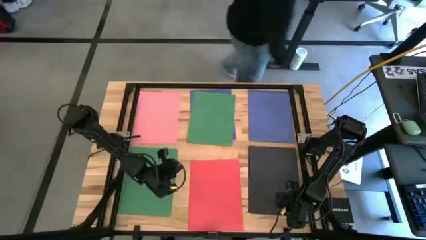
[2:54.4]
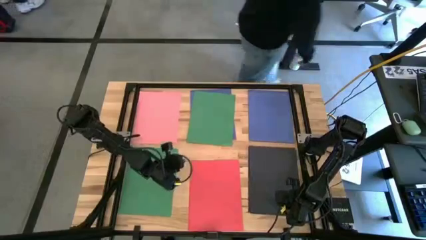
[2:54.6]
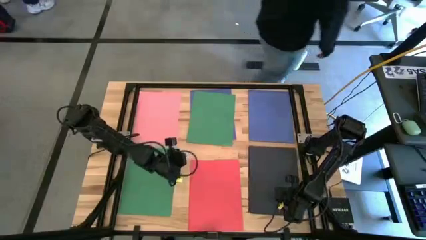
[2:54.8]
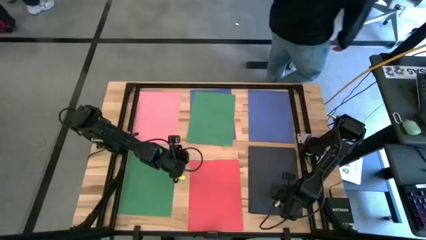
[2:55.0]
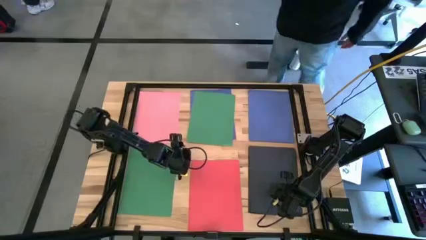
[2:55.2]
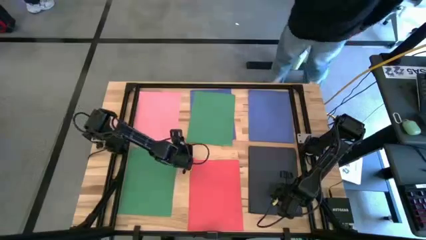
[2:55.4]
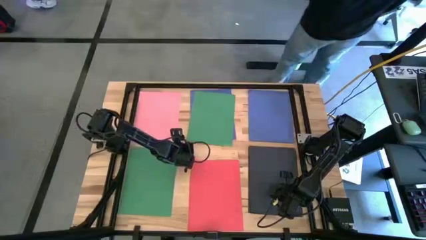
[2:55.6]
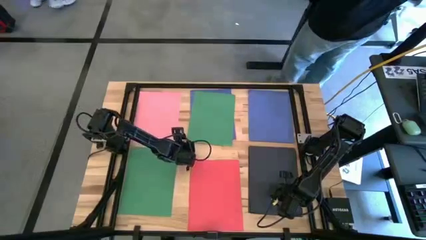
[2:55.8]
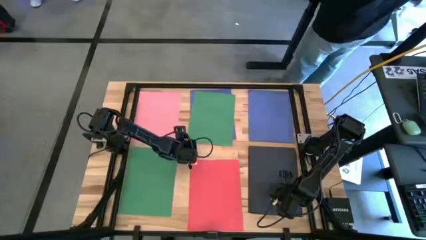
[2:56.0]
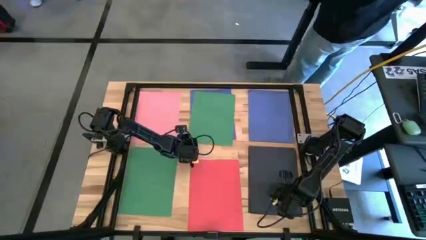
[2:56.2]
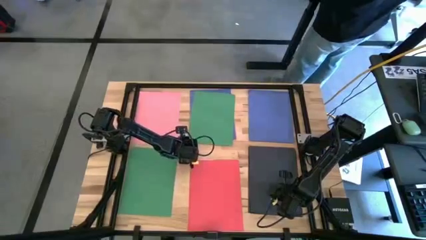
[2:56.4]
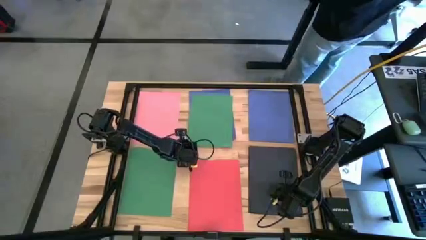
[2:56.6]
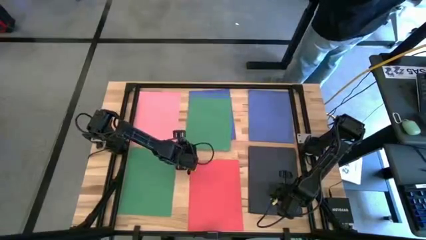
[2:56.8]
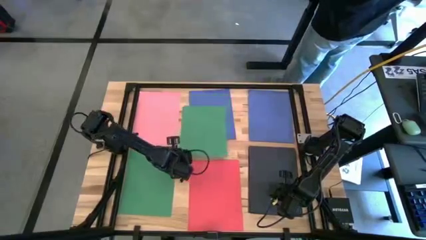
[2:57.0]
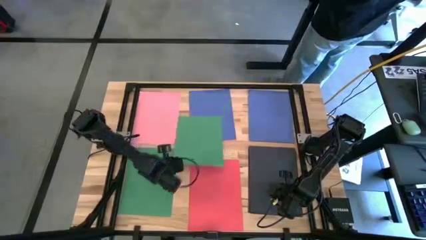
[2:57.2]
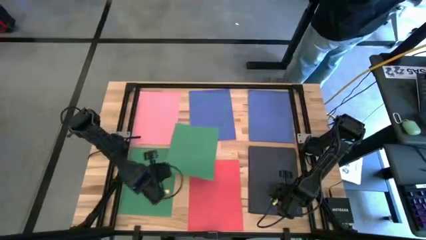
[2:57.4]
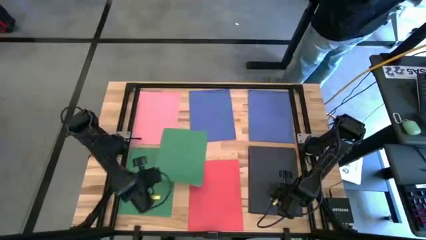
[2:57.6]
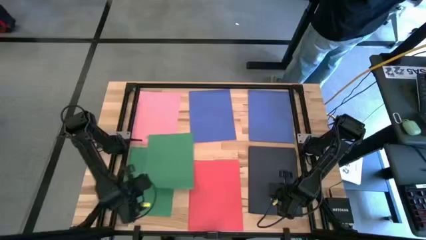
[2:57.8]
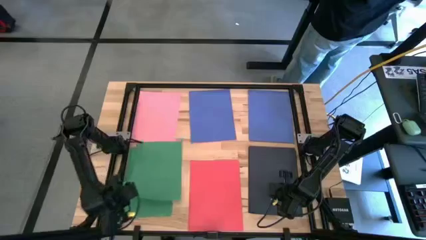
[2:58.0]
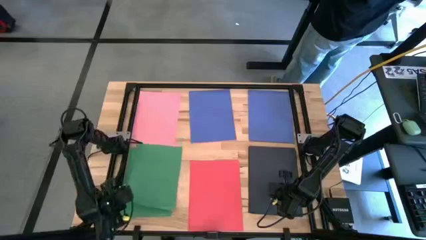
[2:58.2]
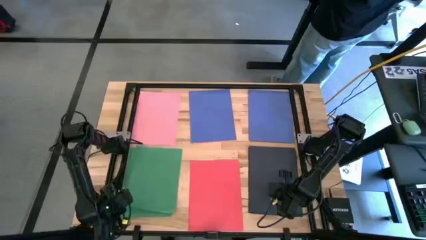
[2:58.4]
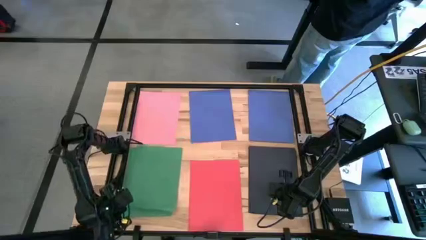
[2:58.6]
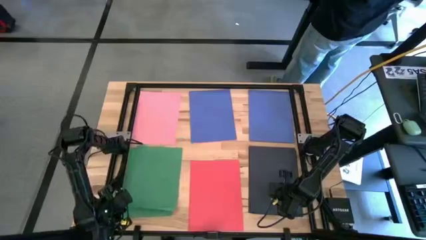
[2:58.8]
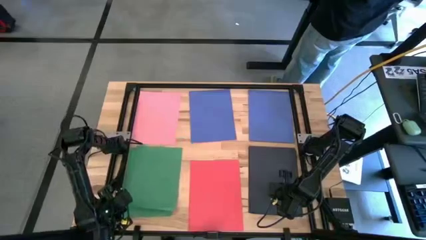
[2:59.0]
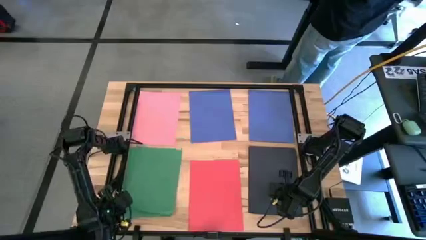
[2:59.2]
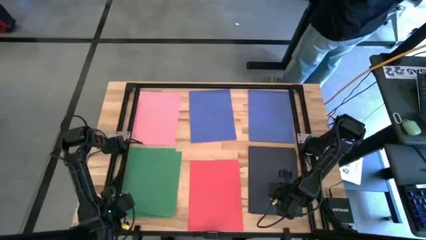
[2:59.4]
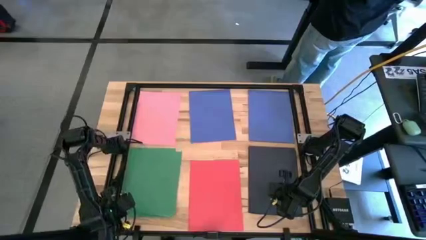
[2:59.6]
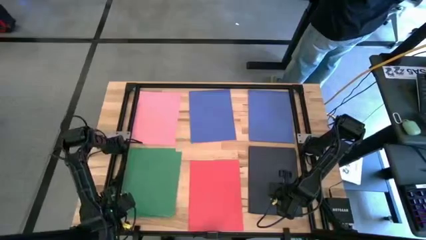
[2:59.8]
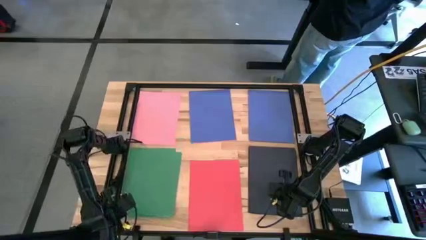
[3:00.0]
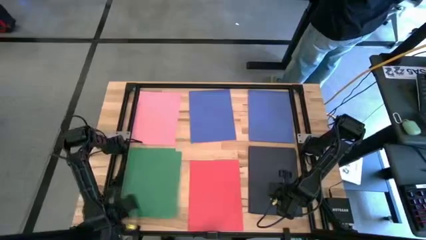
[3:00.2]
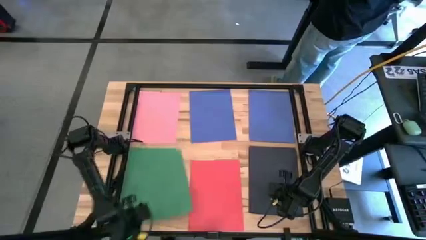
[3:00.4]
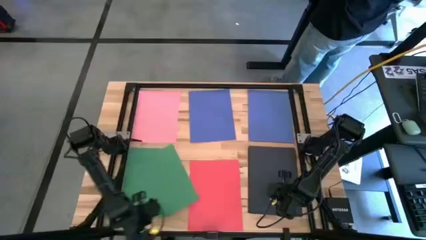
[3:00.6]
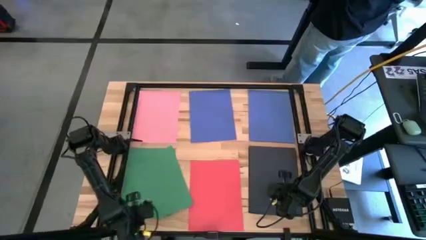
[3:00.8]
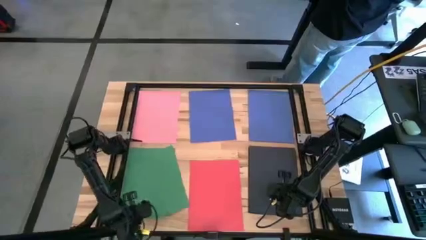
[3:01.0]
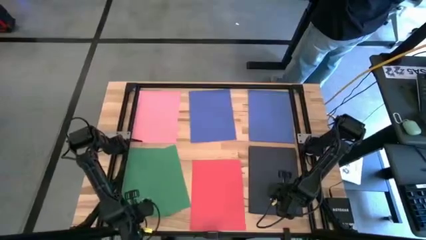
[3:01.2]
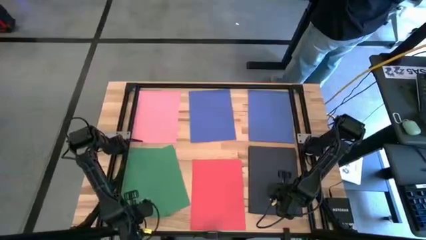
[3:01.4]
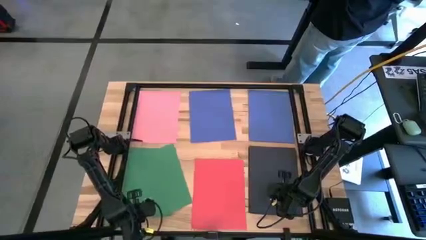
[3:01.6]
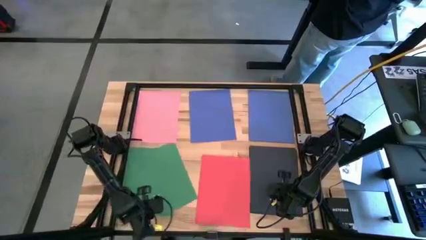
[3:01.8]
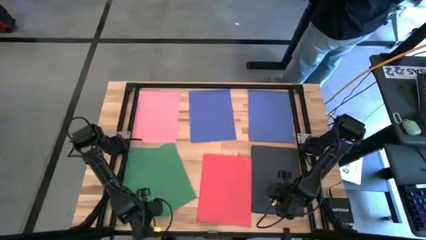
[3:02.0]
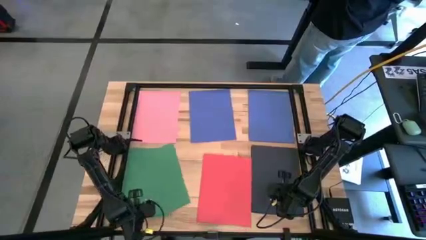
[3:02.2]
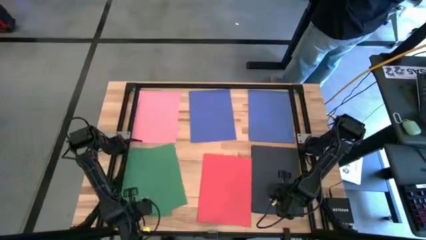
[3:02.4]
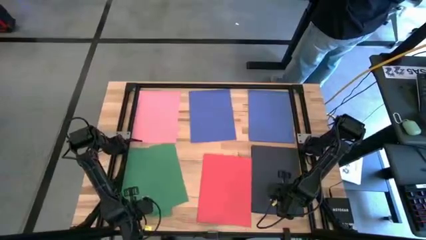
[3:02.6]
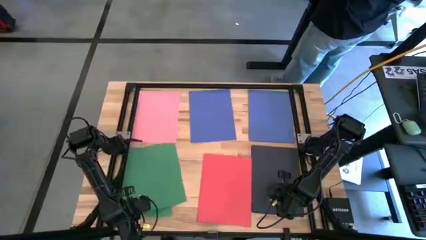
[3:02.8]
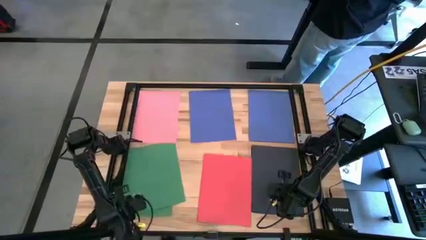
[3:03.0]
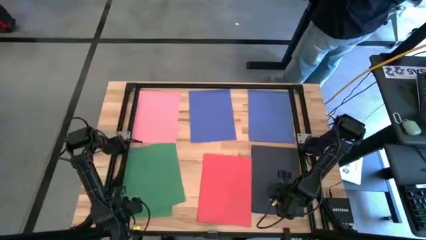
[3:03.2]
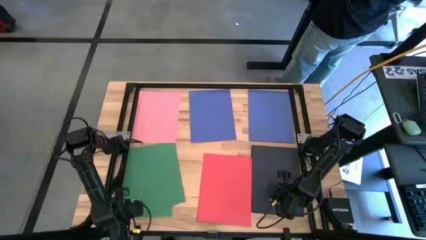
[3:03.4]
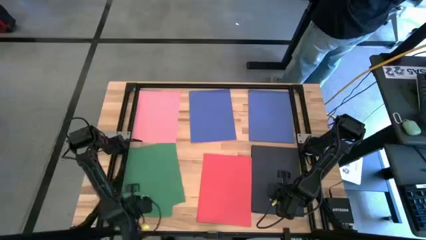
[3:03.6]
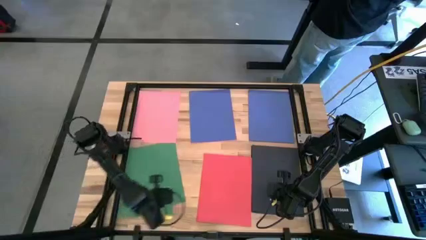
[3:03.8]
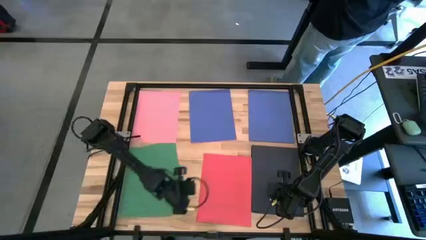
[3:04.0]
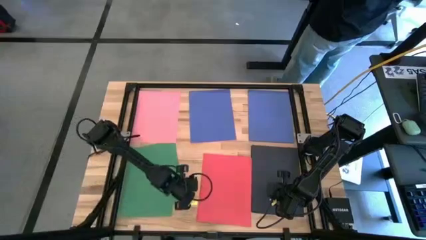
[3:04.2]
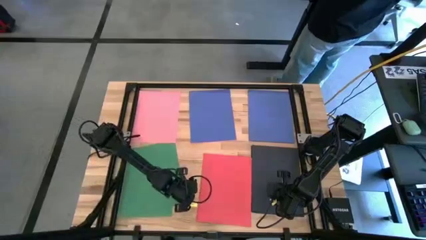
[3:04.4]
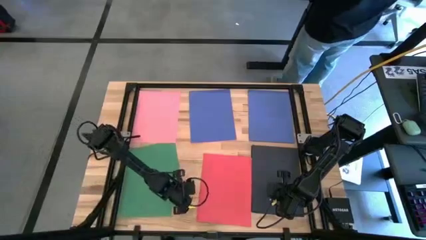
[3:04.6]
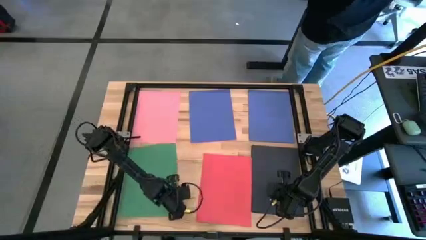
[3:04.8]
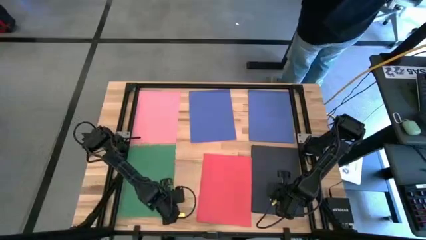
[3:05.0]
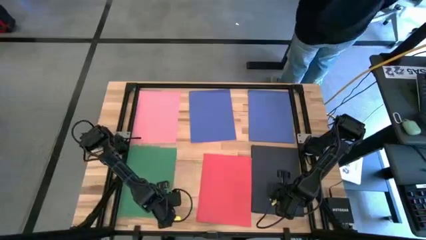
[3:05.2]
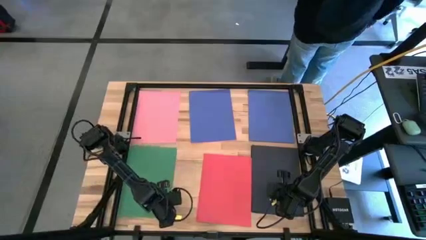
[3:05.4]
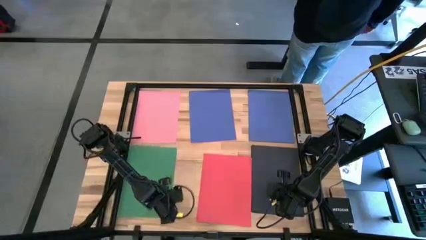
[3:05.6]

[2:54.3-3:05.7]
Task: Organize paper
Stack the green paper on top of the green paper

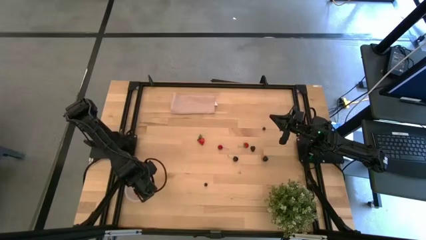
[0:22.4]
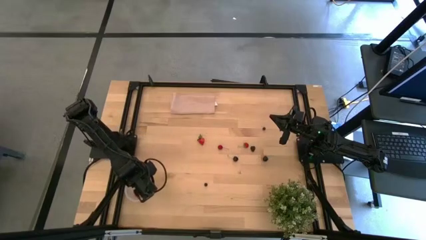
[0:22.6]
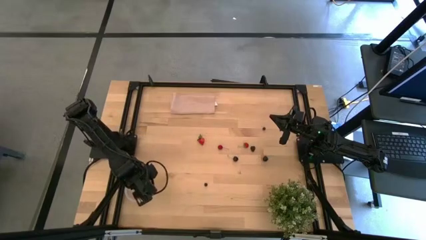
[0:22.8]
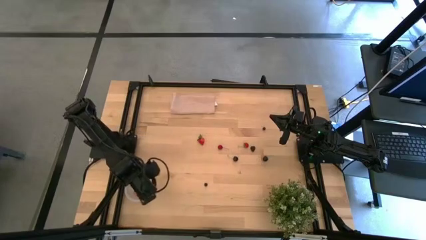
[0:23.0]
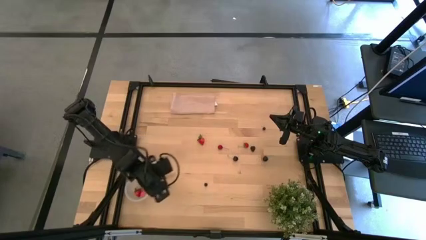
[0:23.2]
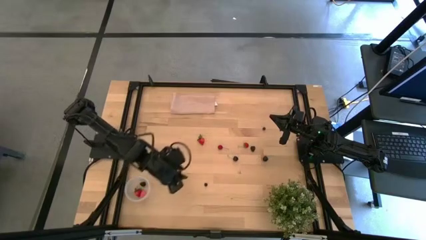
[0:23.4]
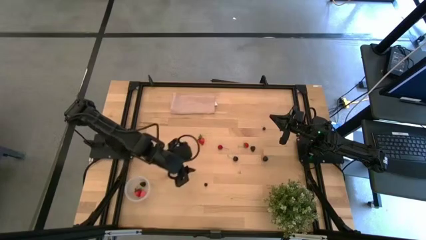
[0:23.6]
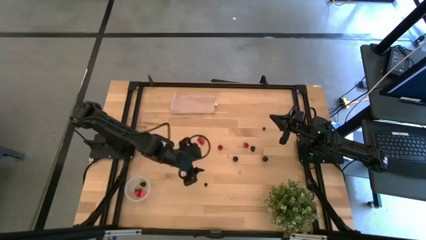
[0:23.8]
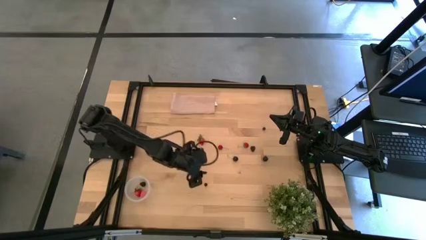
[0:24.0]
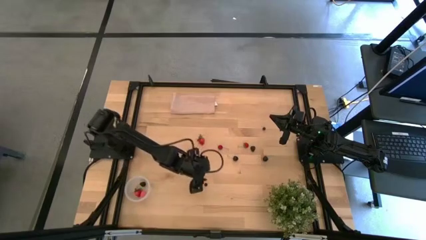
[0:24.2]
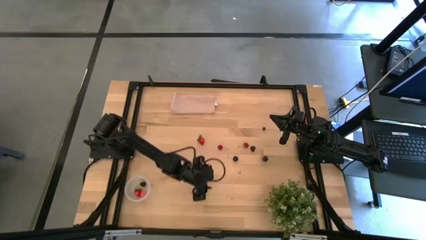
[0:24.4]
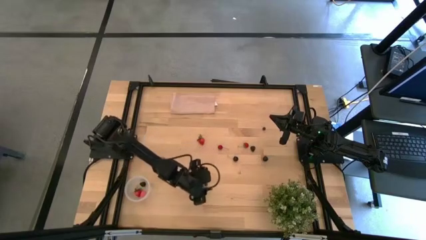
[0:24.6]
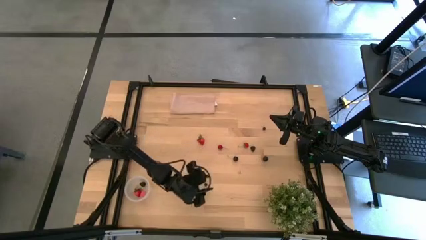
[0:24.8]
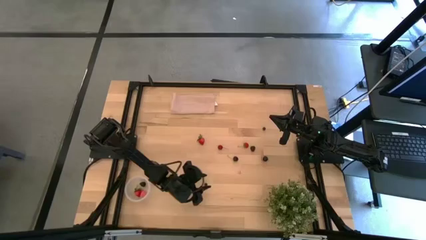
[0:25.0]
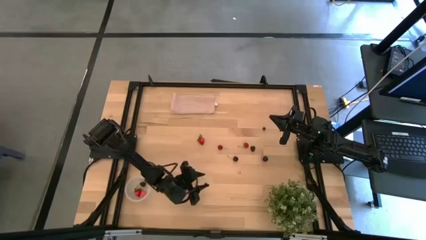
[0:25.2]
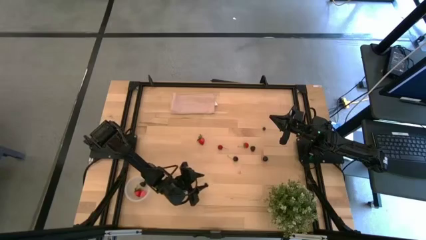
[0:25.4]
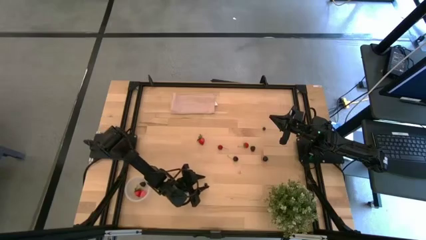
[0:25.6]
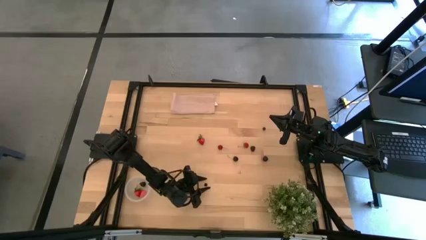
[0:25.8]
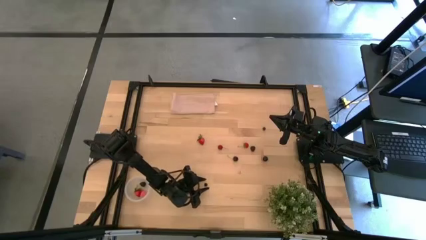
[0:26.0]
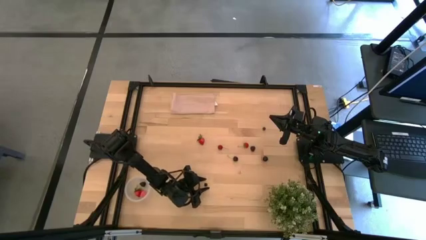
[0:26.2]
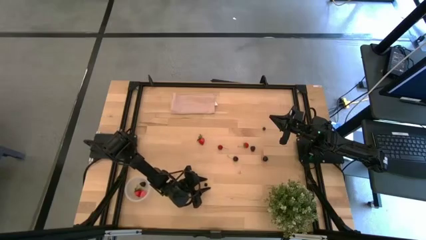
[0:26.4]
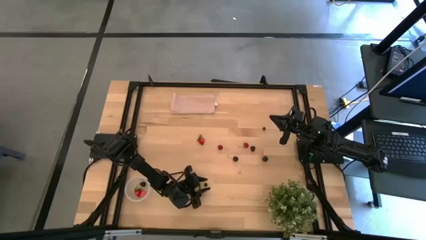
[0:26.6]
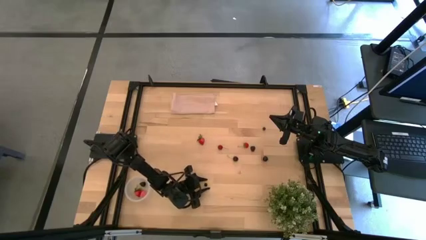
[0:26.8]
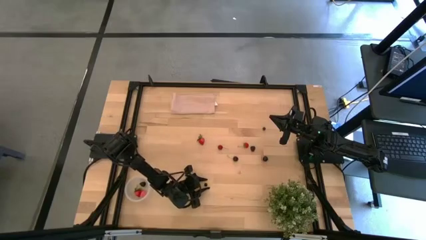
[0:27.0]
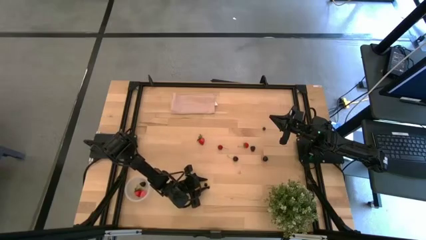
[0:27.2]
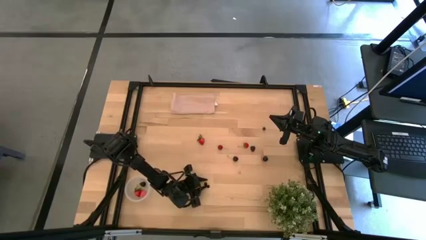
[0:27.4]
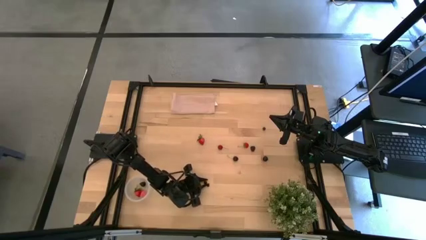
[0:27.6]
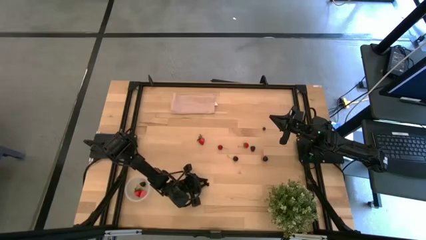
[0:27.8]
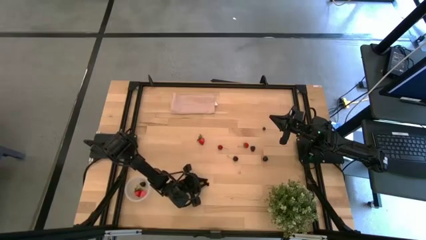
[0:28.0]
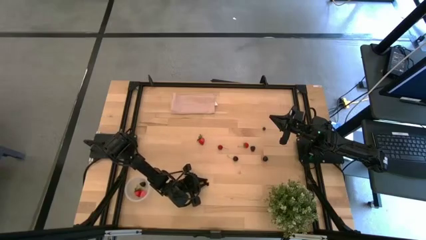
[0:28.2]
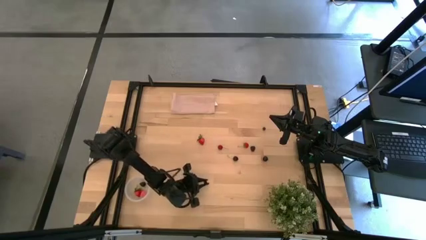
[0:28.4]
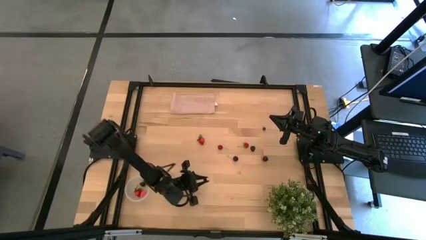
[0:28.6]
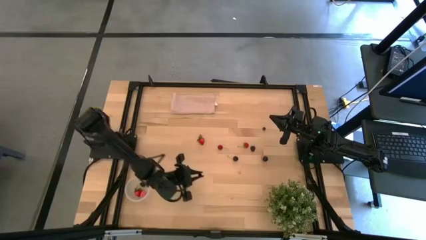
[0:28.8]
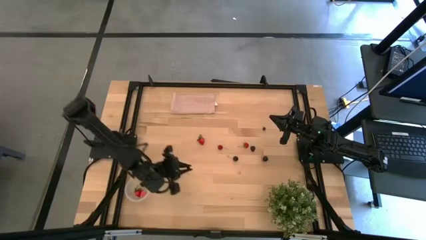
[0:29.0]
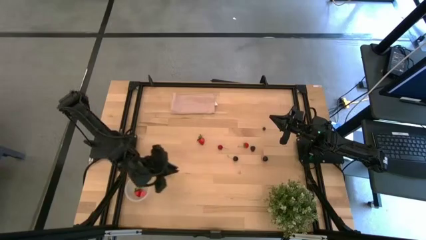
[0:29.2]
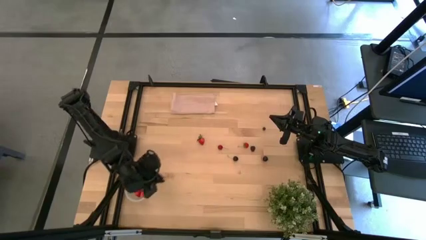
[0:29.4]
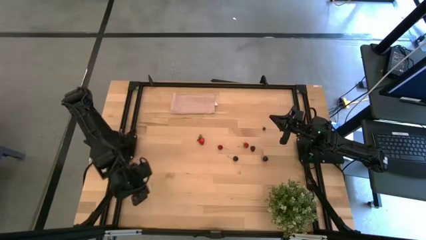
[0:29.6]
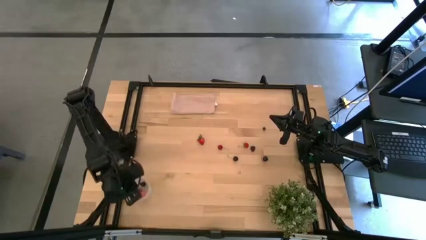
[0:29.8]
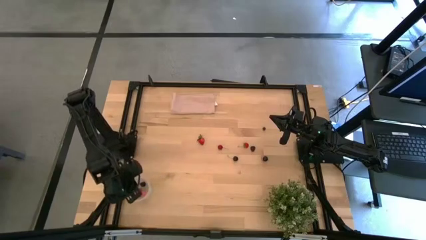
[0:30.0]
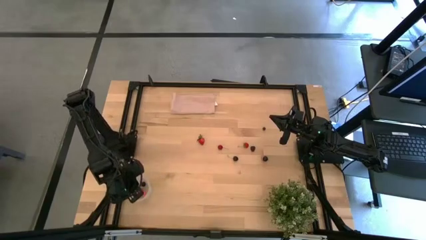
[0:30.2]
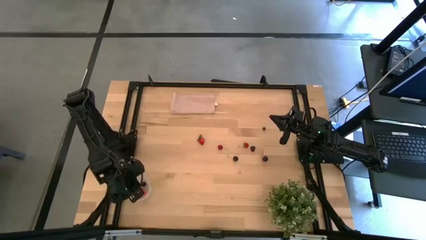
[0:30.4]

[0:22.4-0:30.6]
Task: Pick and placing Produce into tupperware
Put the bottom blueberry into the transparent bin
